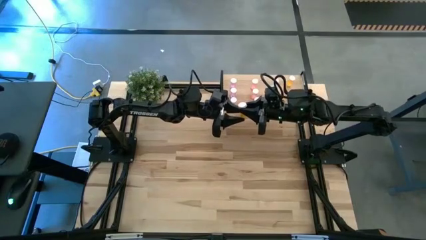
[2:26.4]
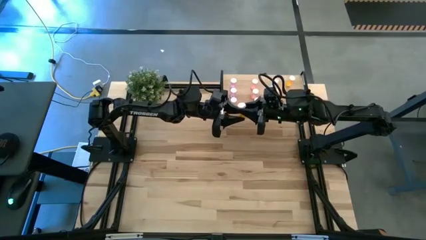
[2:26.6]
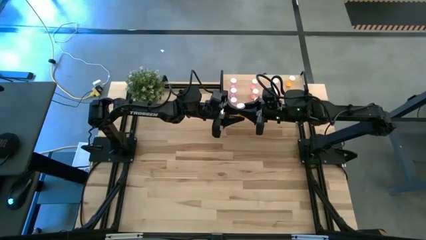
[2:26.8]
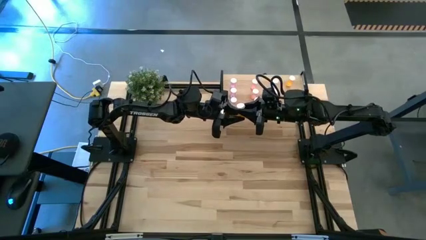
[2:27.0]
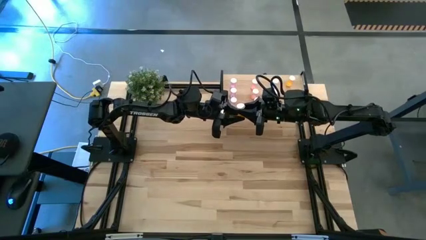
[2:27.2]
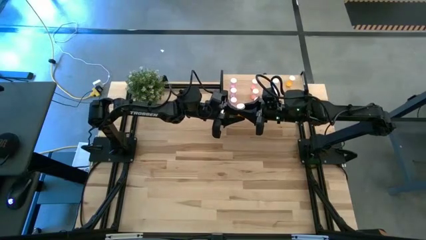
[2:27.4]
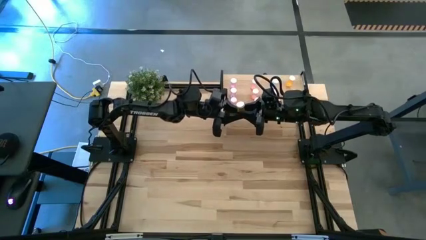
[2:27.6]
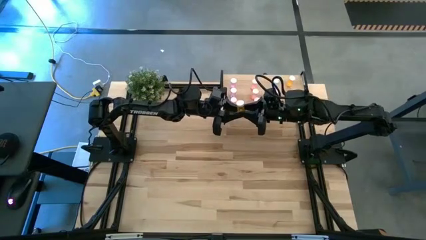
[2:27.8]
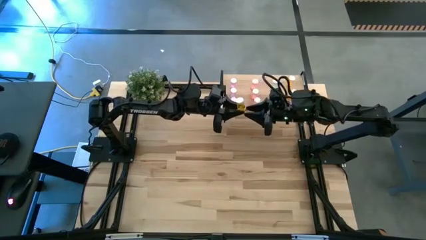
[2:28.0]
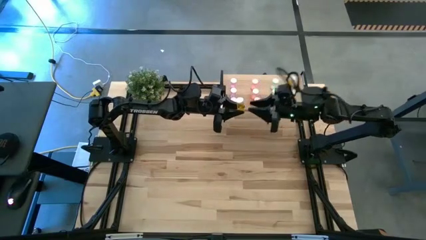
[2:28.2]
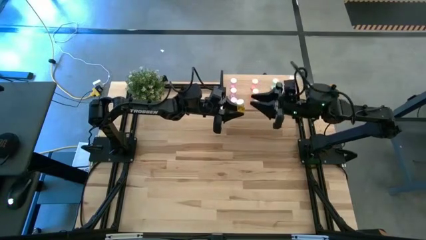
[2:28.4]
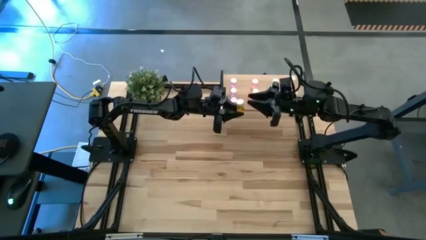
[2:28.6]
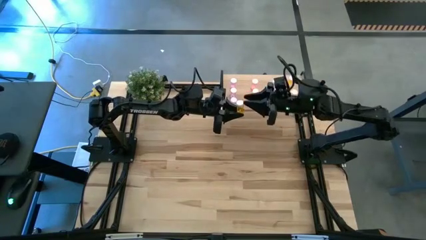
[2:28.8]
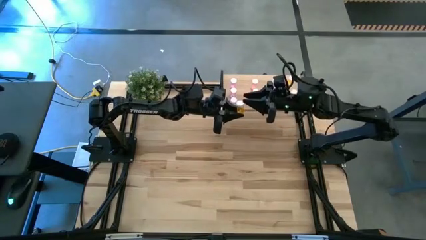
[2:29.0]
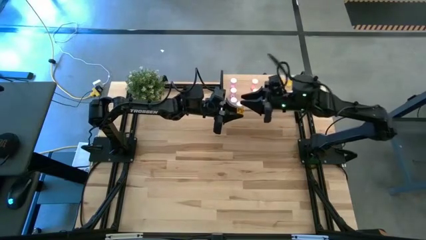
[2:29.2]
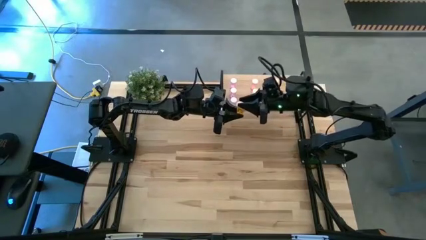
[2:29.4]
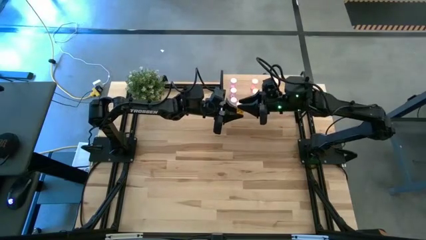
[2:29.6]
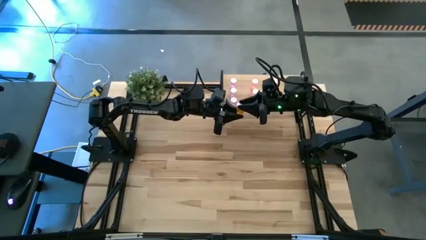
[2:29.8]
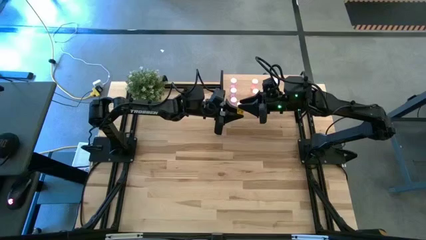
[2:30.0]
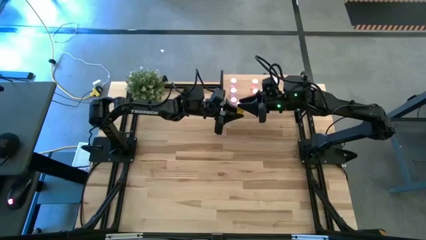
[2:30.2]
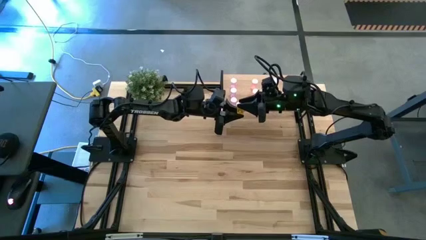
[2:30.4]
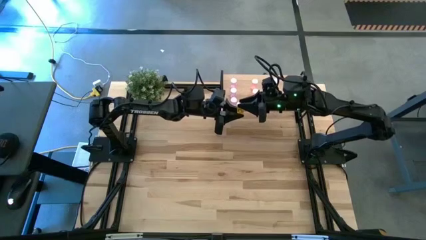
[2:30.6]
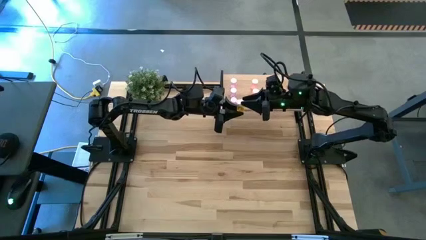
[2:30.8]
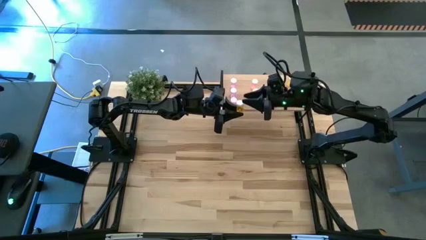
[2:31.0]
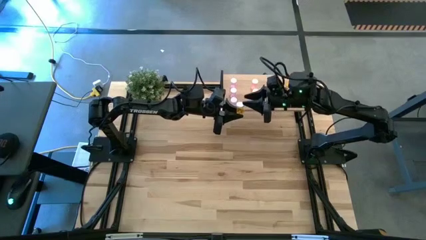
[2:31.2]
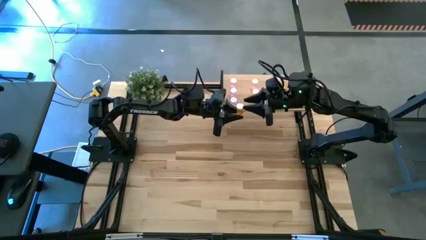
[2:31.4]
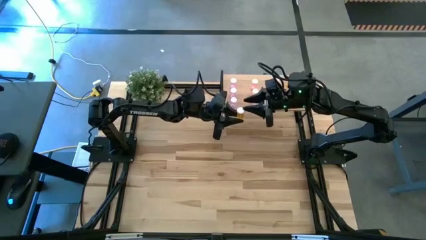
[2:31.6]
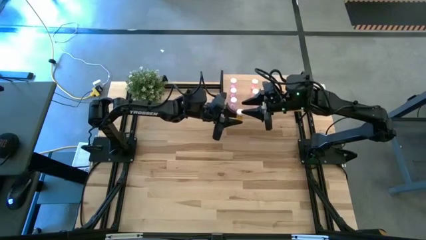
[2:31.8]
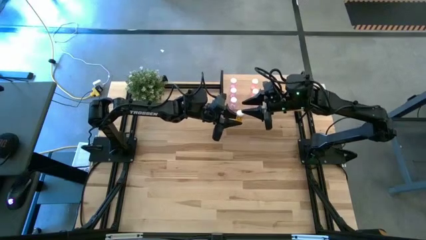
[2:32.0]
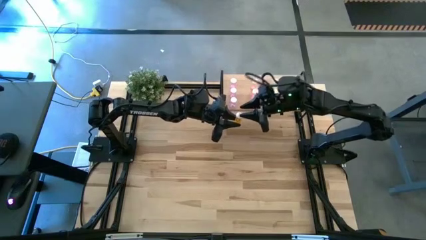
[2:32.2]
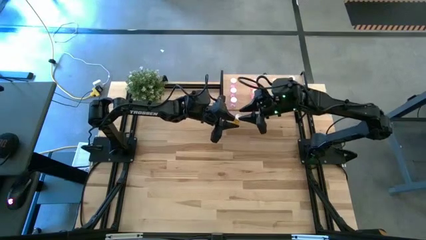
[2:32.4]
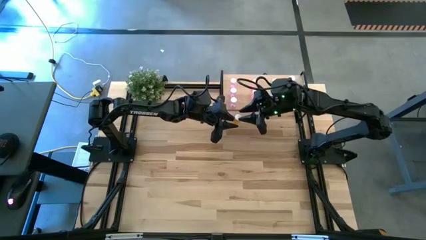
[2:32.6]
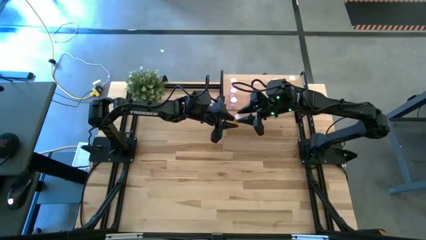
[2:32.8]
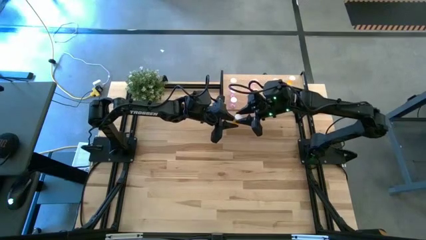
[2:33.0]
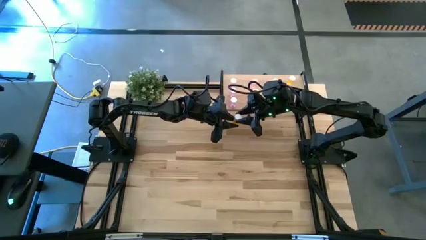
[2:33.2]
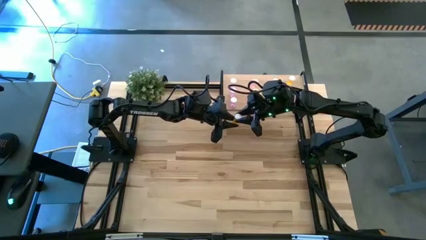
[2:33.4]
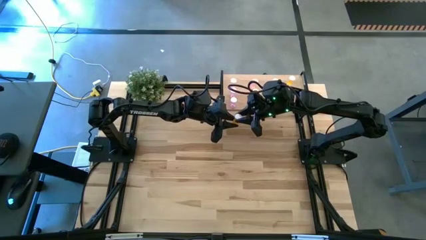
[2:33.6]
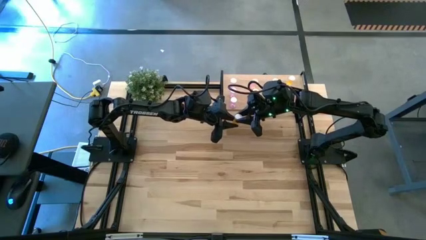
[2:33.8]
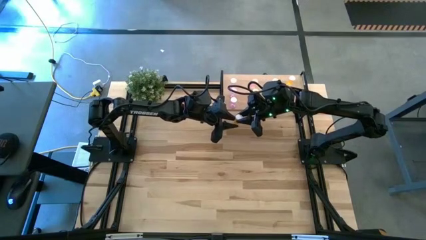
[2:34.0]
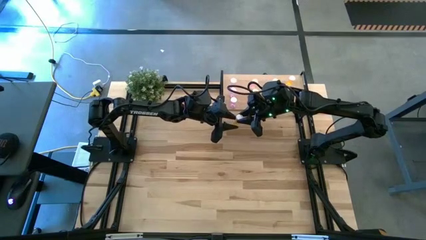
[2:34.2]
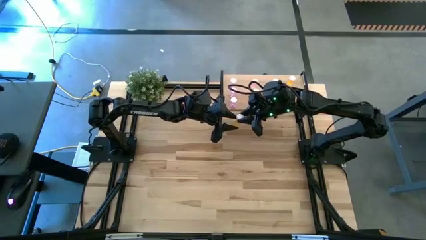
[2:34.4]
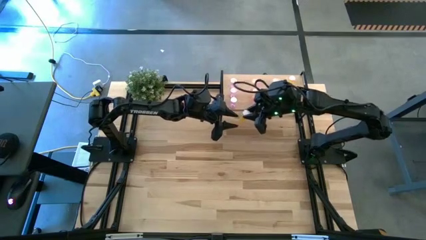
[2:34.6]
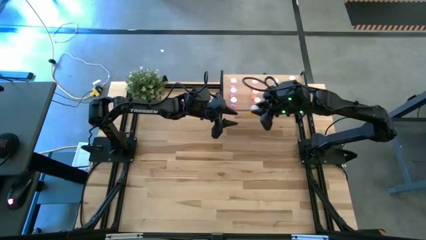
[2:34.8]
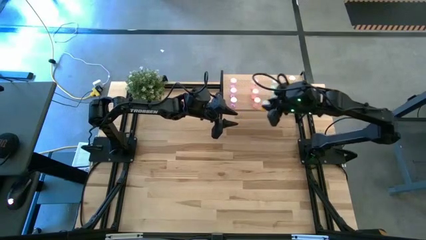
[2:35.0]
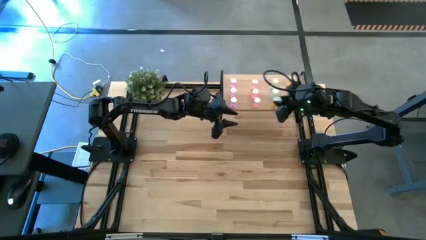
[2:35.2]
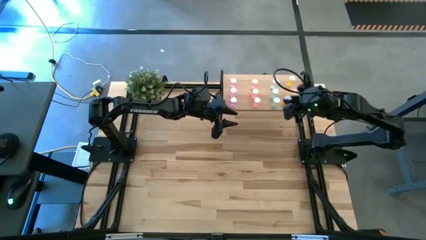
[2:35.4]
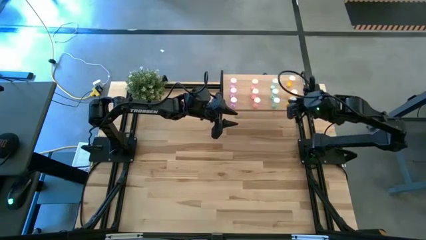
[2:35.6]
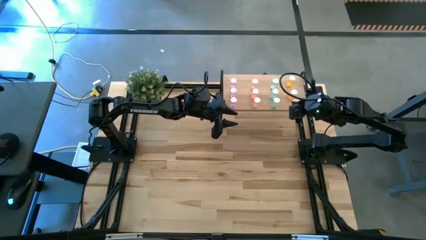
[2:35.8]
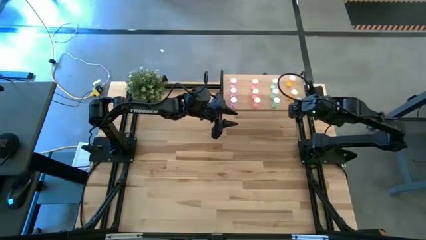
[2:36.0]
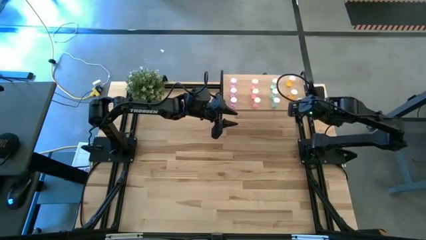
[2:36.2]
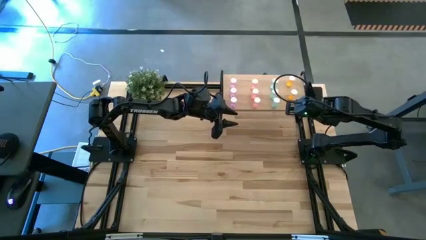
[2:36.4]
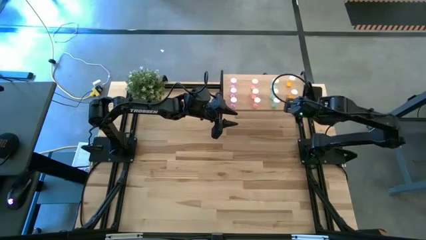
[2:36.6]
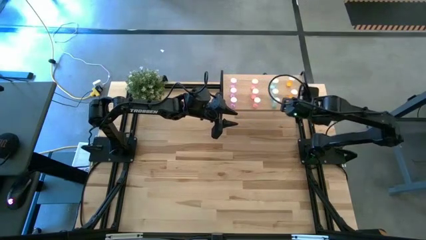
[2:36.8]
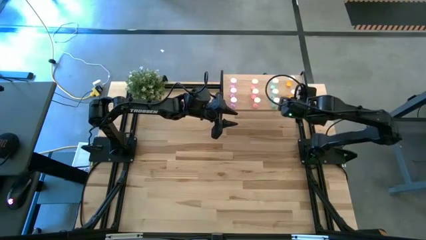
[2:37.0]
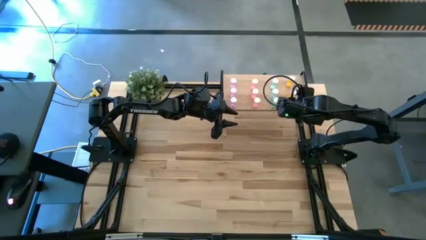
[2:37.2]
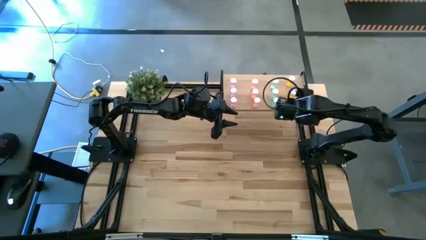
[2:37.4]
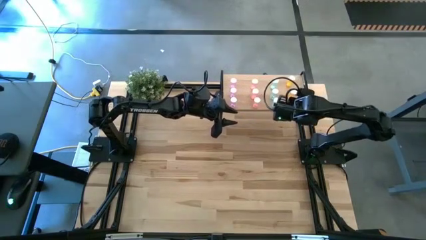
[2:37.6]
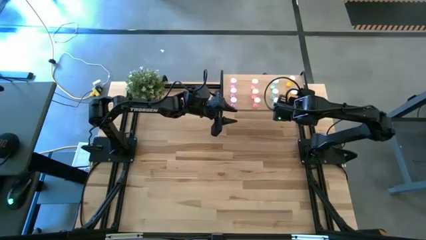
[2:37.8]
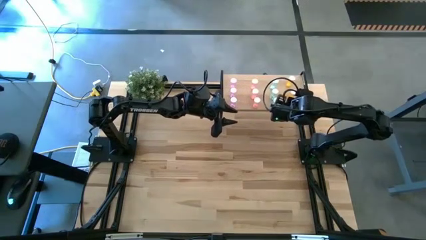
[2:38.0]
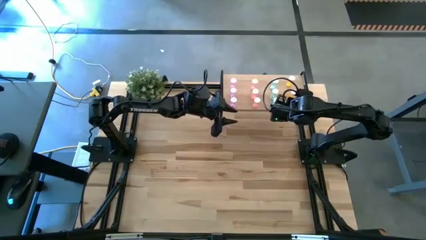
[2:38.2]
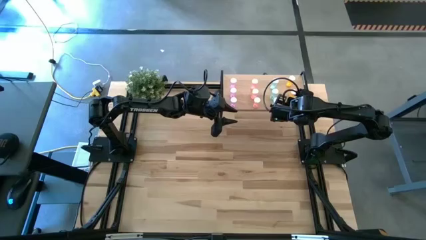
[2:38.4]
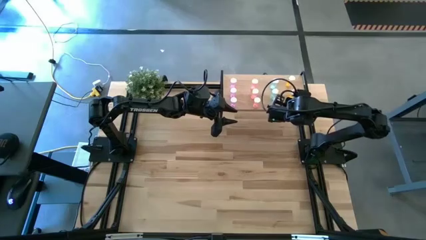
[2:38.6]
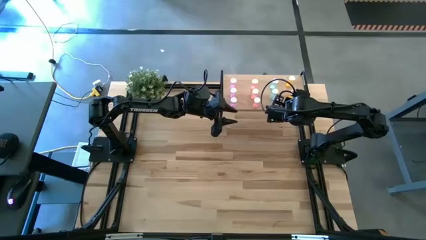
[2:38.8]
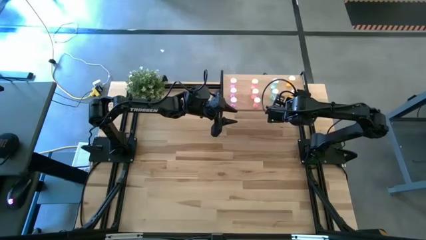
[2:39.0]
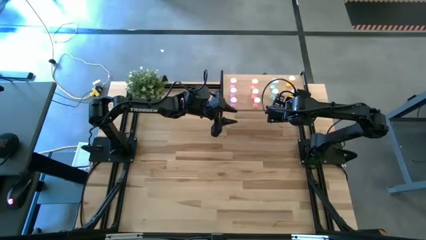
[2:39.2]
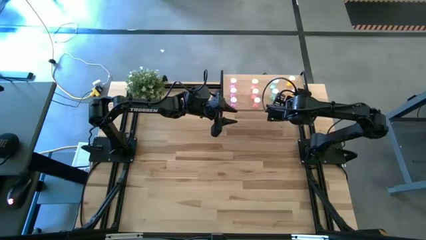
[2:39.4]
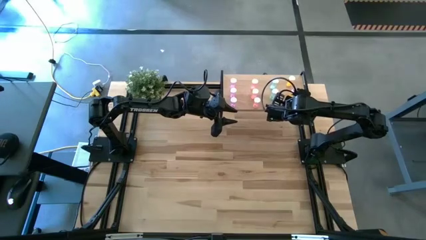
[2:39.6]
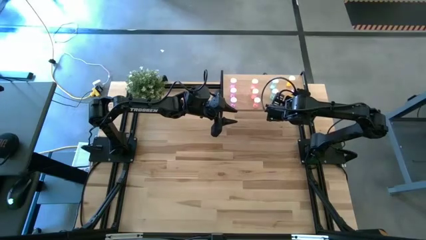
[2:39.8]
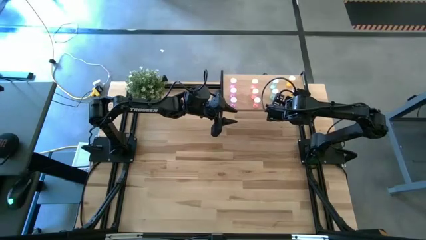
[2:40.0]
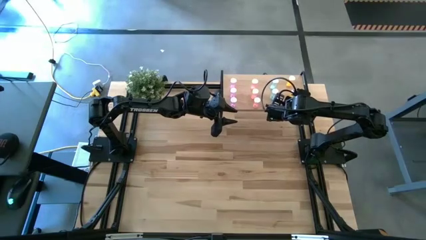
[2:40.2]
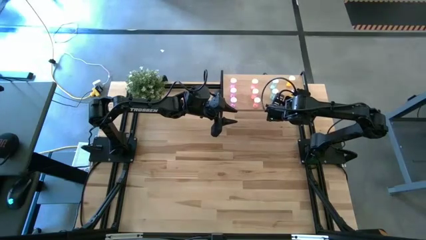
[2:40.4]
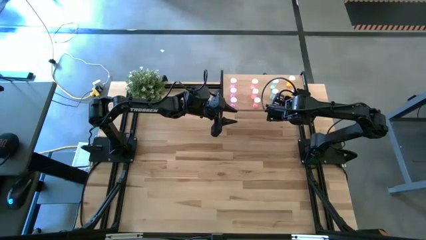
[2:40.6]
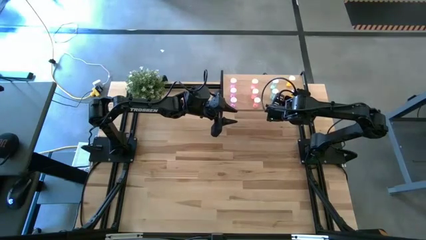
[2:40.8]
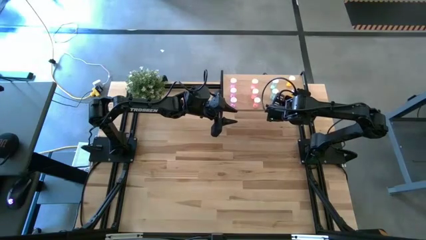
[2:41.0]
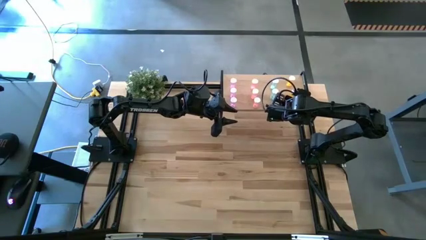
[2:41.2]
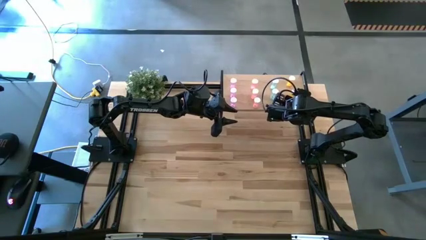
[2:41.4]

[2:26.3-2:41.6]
Task: Pick and place medicine bottles onto shelf by color
Put the orange pill bottle on the shelf aligned with the other orange pill bottles
